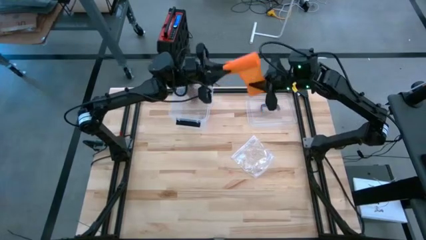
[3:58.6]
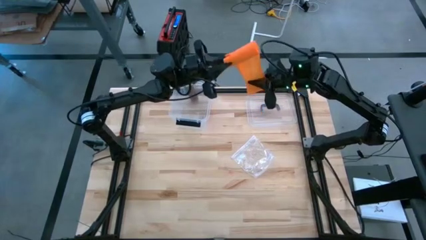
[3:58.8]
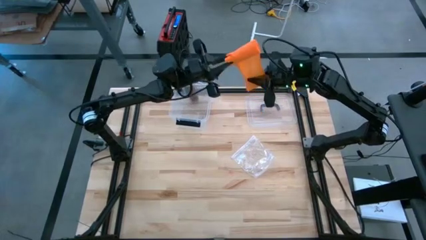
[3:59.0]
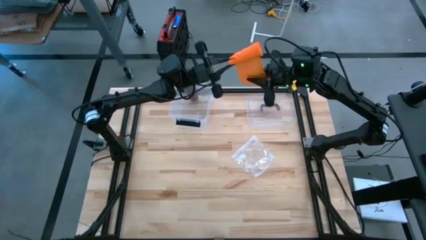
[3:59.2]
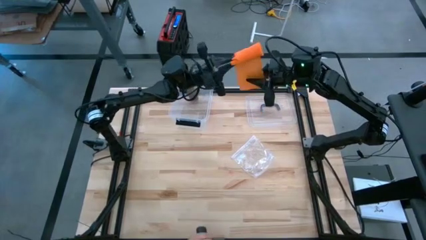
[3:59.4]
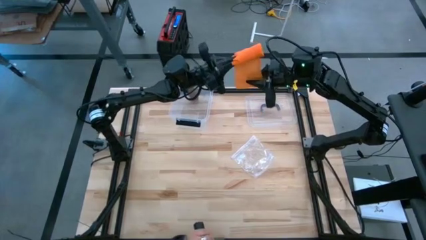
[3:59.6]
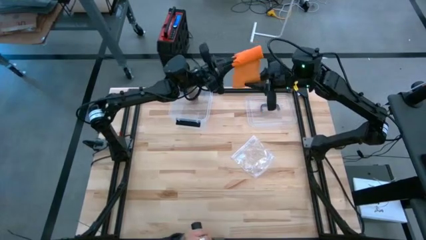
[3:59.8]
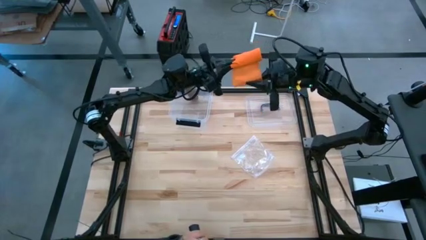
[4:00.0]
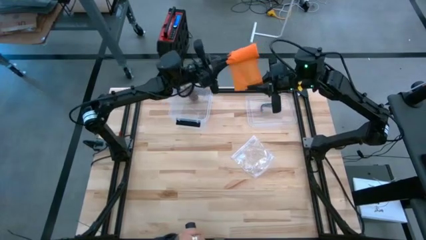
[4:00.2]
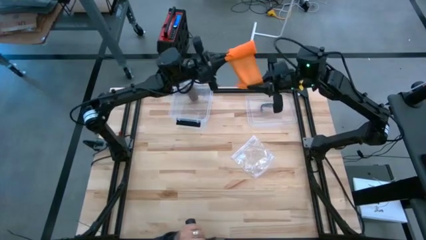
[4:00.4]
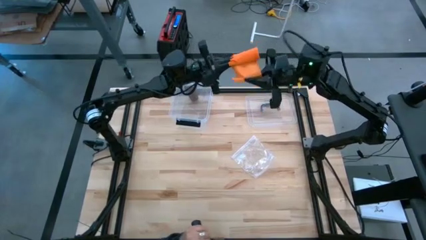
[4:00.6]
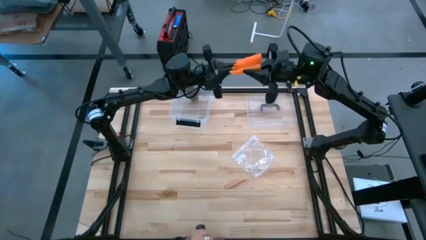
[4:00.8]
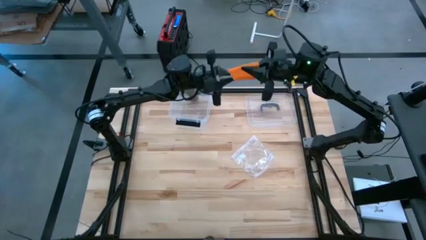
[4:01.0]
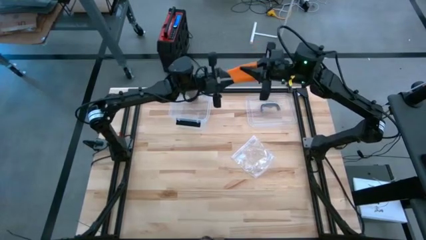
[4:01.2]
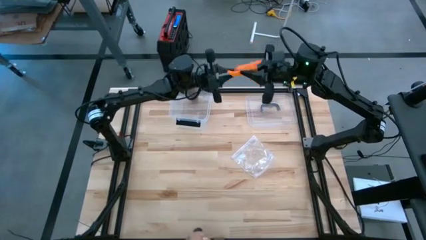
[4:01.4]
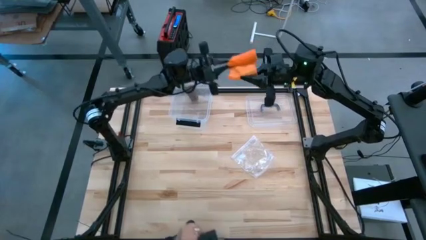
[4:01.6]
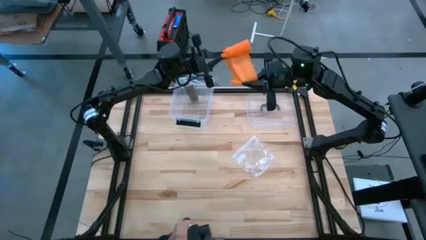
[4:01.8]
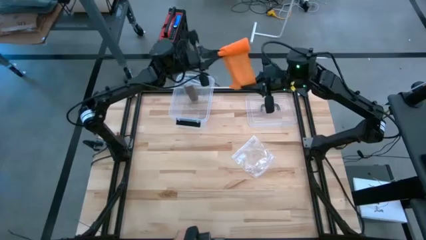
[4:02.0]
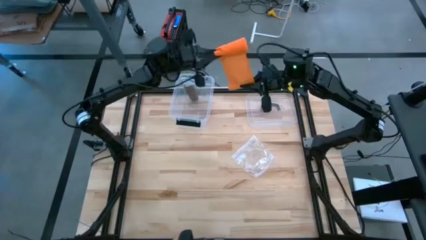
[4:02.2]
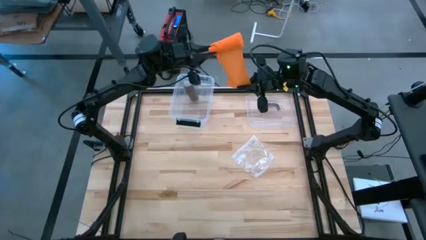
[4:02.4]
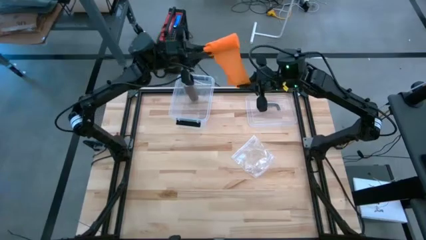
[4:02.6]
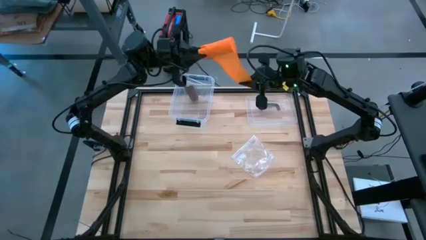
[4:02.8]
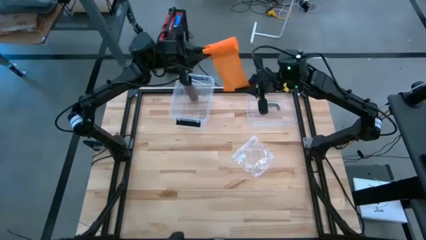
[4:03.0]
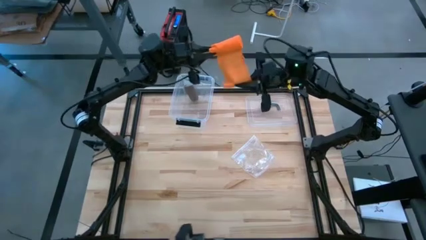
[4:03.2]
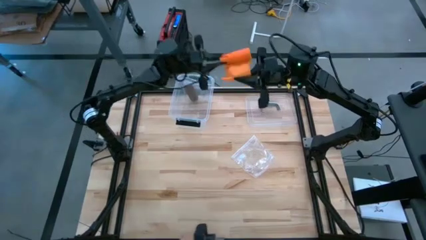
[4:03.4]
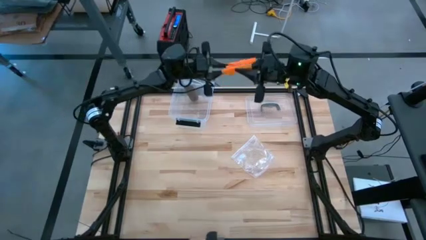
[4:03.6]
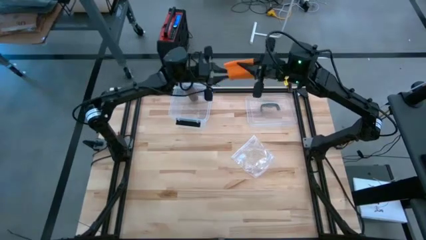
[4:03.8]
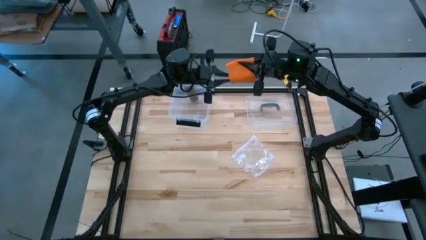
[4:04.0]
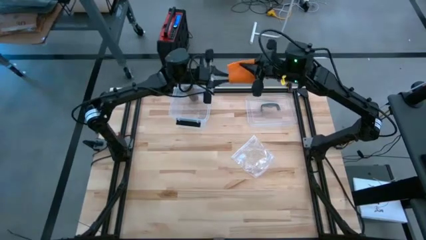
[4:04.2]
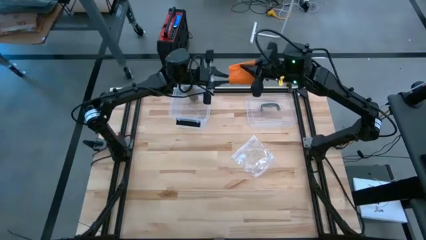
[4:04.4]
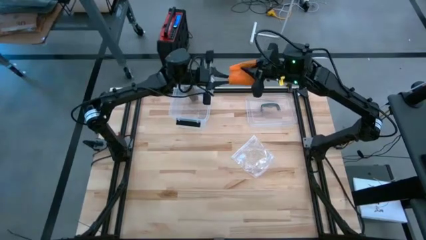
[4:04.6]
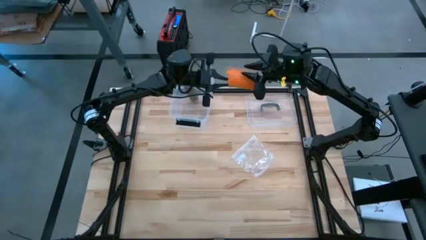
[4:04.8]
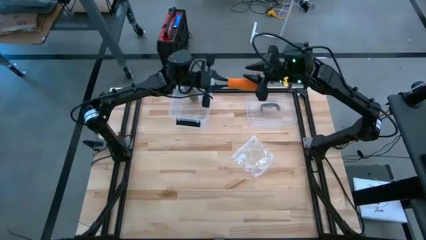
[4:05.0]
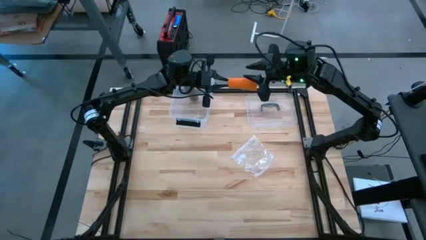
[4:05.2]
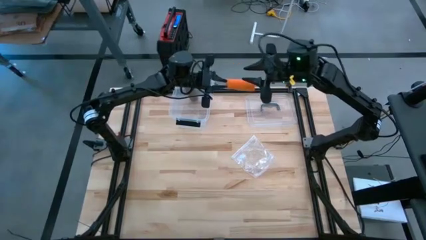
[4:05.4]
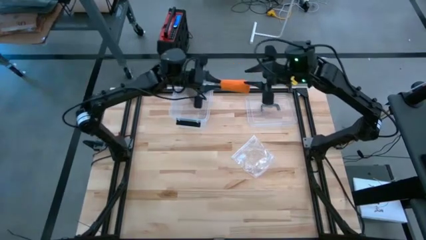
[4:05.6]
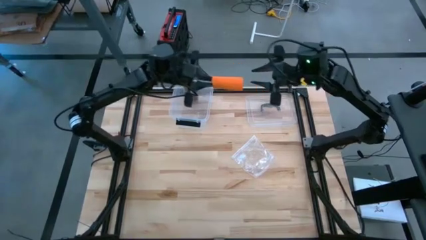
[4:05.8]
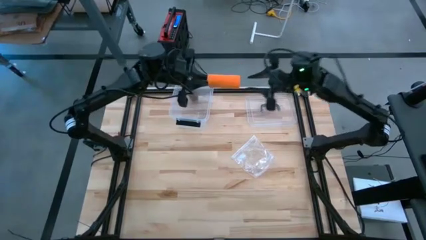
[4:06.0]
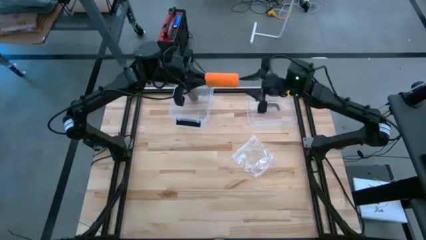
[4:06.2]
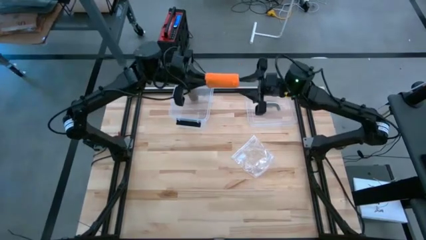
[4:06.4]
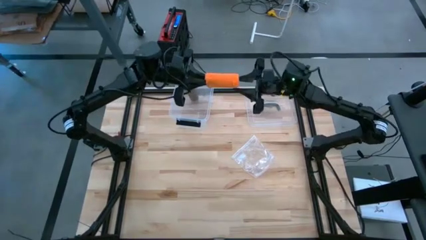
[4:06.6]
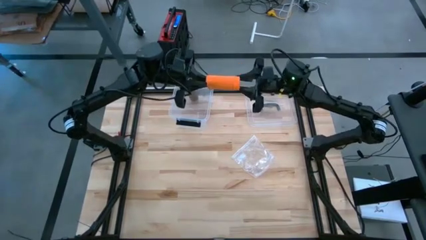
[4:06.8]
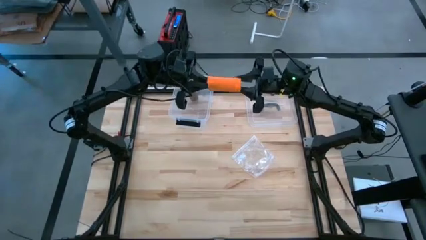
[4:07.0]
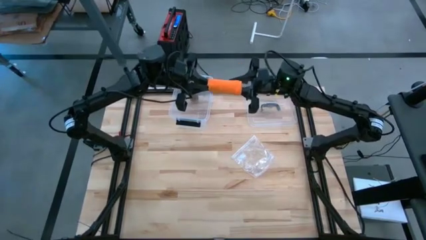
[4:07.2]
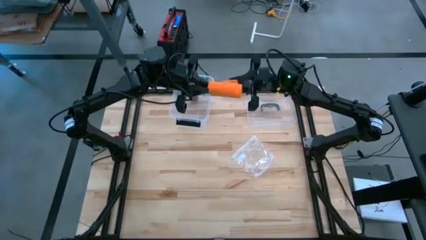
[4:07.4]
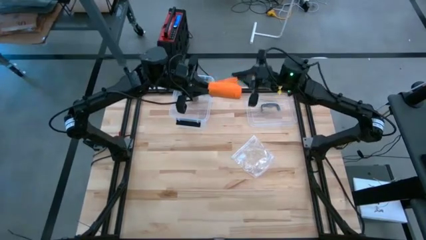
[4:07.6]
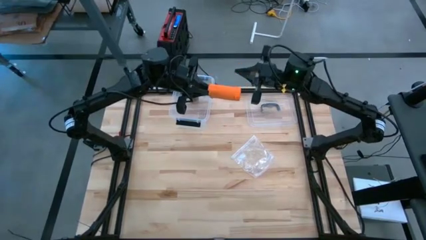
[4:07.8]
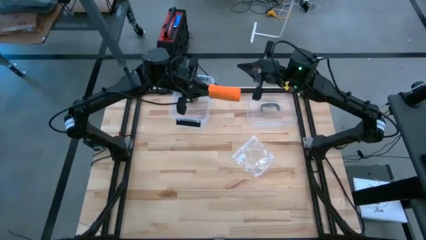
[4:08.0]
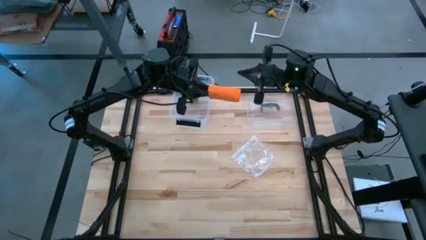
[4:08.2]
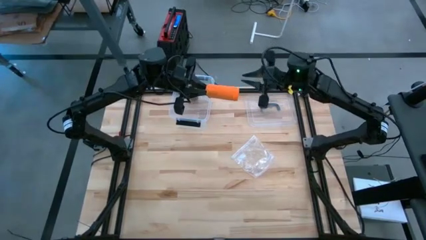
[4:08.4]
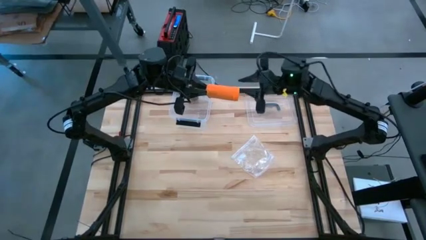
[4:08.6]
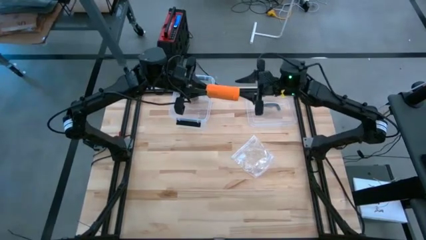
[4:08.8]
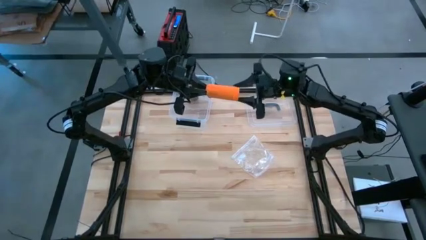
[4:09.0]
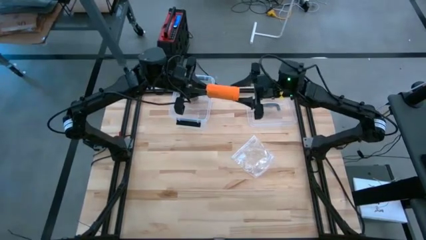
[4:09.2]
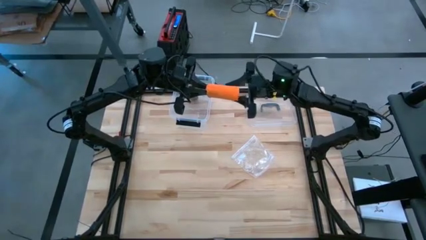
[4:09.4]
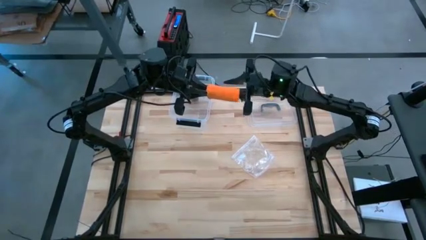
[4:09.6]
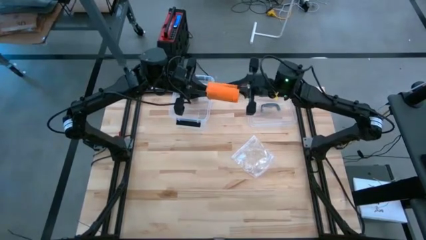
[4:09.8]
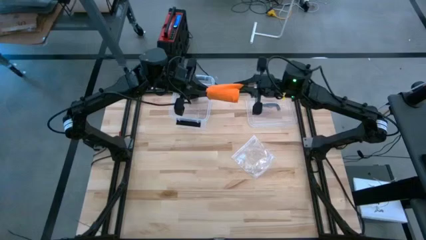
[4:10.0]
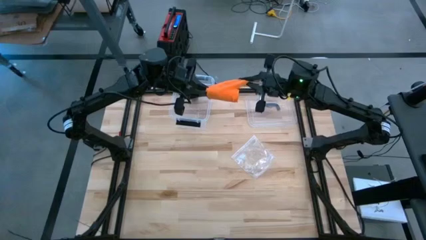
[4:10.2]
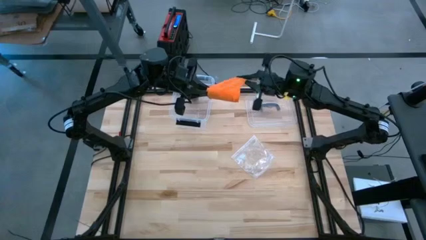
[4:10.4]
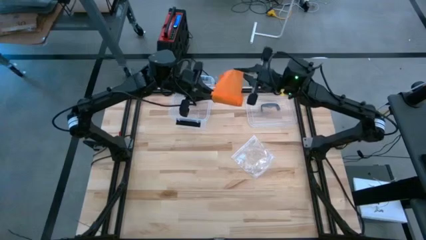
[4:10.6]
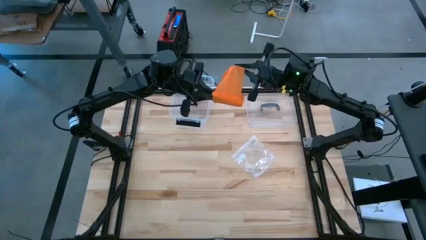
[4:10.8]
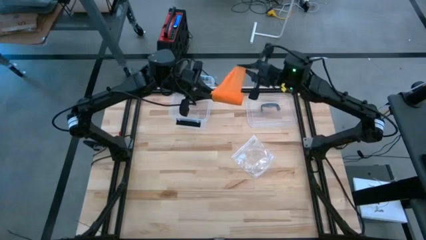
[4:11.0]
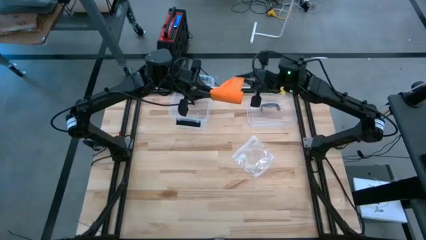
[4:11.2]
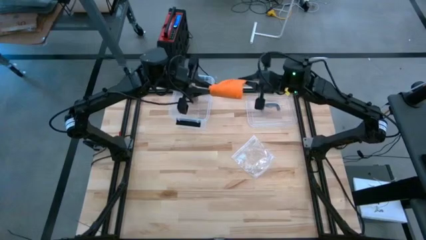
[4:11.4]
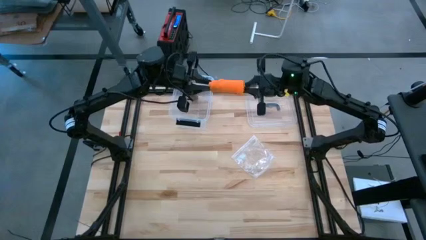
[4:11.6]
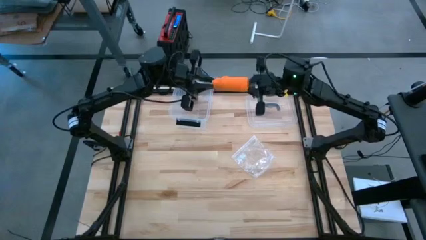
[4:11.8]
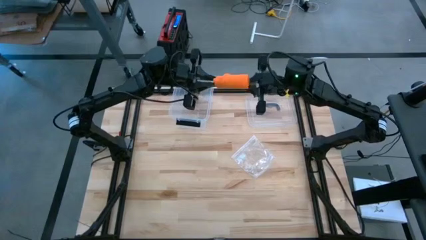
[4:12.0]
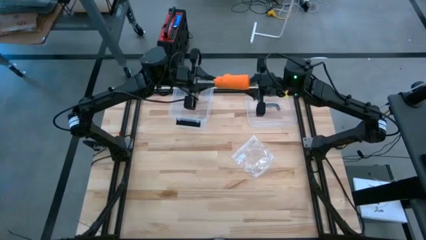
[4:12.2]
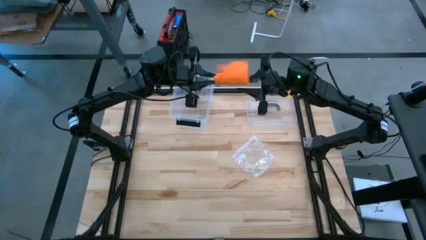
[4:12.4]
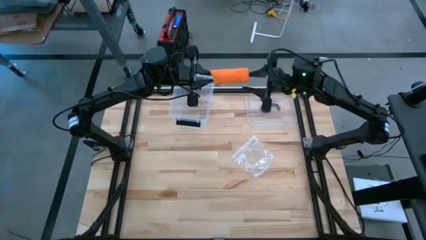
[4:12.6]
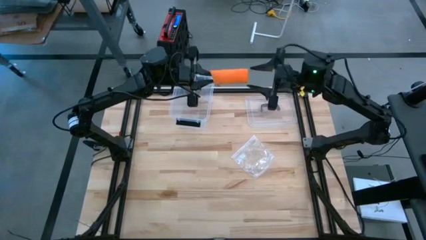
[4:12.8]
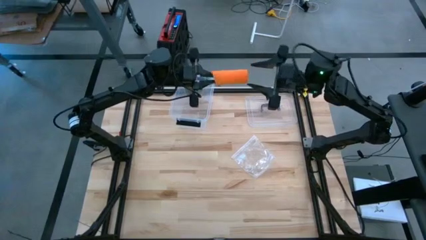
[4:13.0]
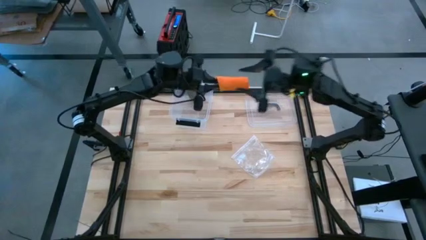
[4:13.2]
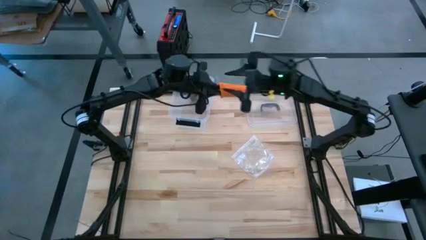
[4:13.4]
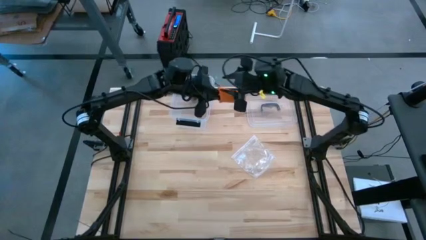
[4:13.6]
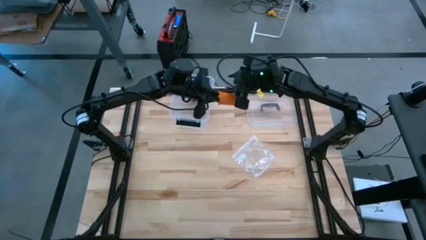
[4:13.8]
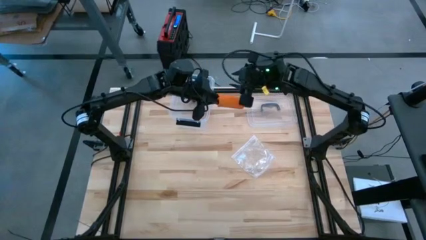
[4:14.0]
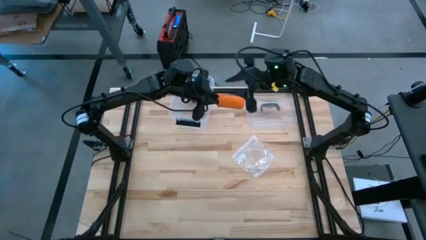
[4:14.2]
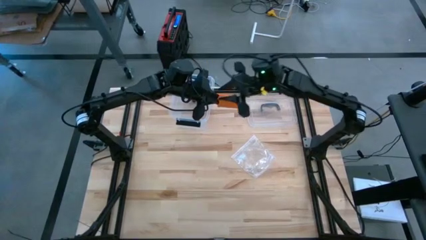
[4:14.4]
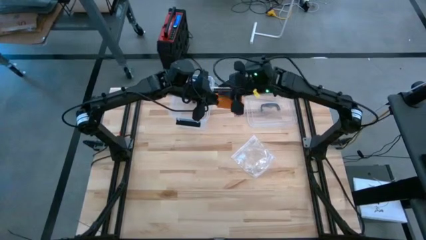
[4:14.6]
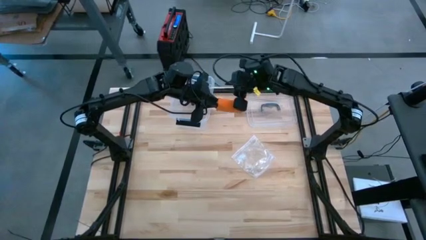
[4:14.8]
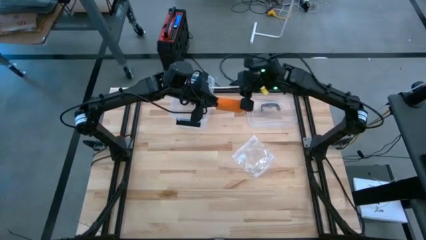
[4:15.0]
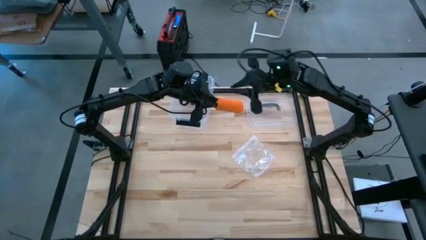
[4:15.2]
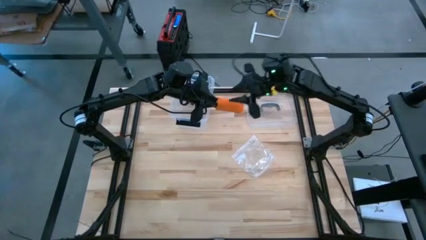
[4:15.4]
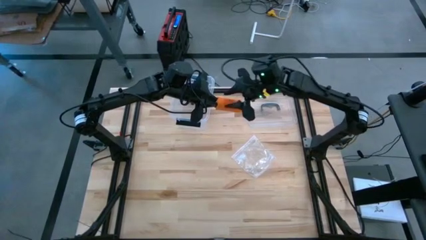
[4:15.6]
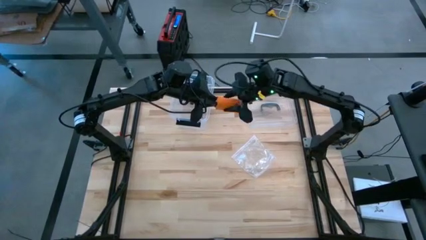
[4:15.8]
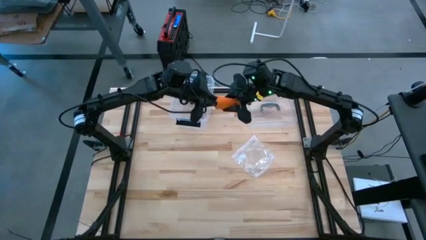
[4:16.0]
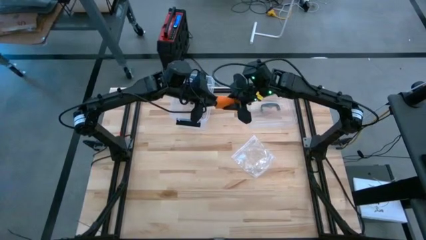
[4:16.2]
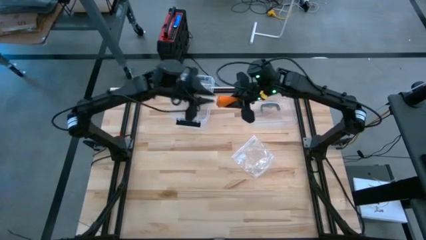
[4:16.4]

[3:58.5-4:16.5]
Task: Roll bandage
Roll the orange bandage
